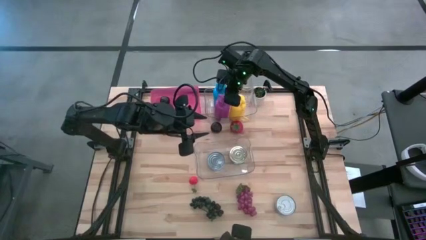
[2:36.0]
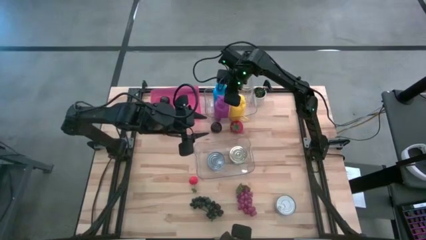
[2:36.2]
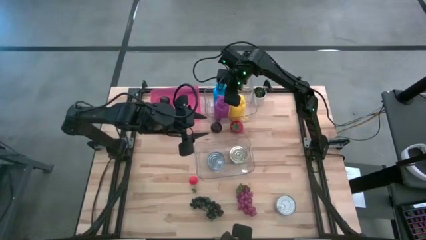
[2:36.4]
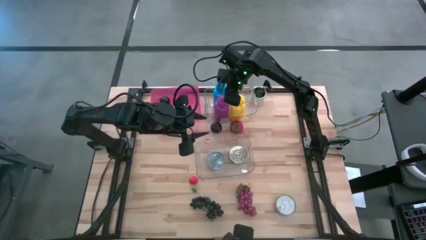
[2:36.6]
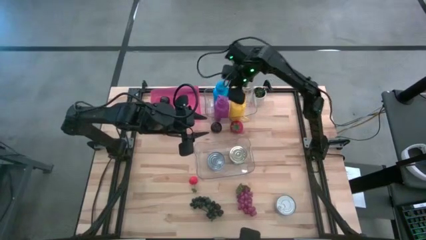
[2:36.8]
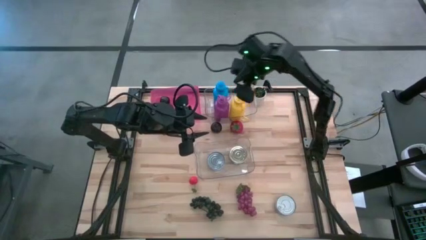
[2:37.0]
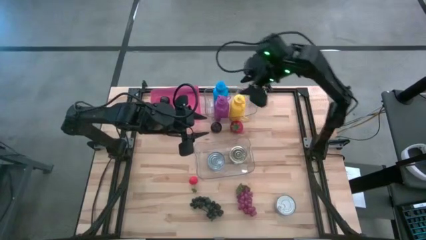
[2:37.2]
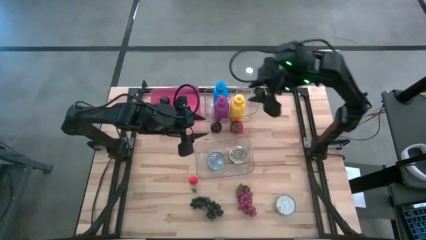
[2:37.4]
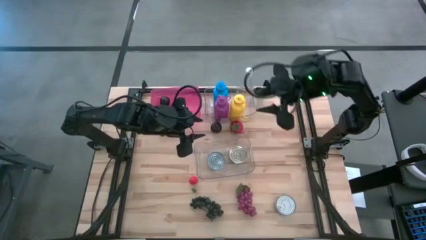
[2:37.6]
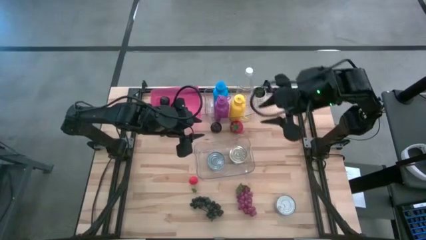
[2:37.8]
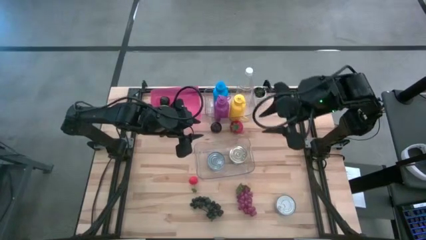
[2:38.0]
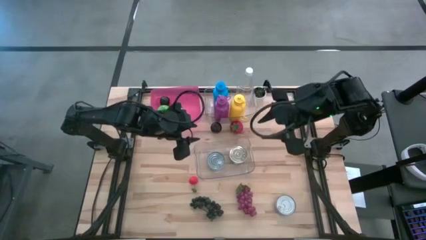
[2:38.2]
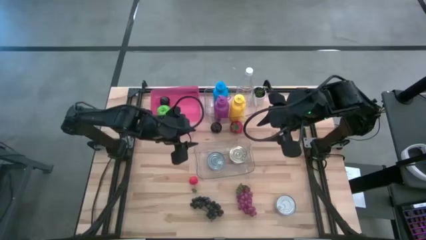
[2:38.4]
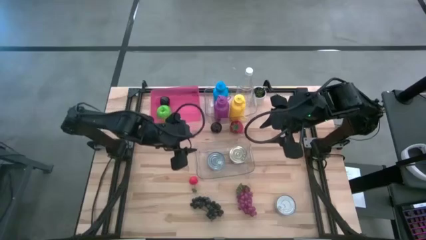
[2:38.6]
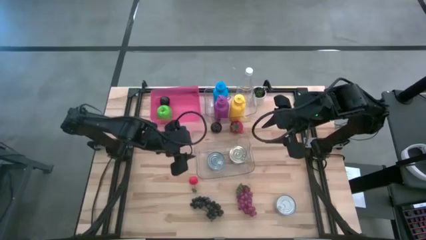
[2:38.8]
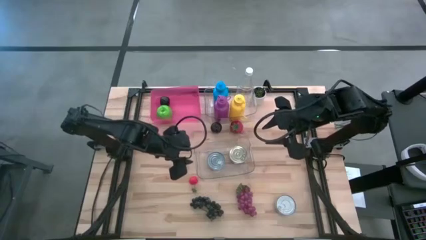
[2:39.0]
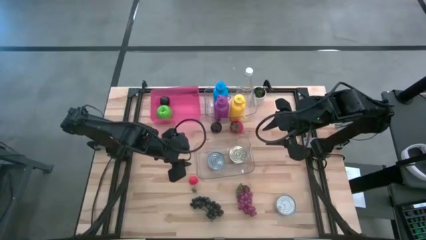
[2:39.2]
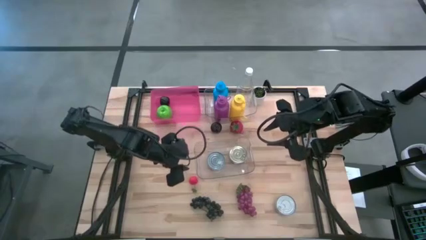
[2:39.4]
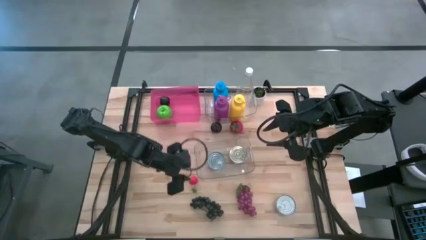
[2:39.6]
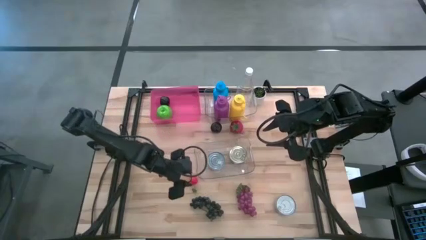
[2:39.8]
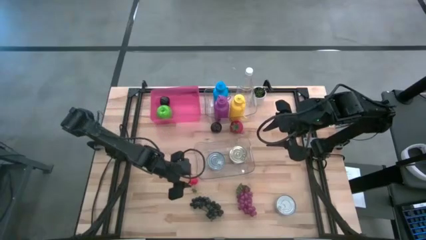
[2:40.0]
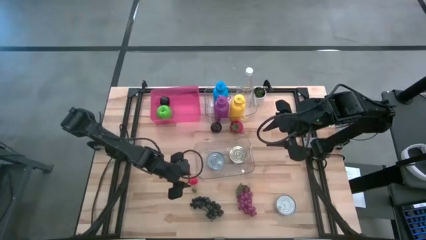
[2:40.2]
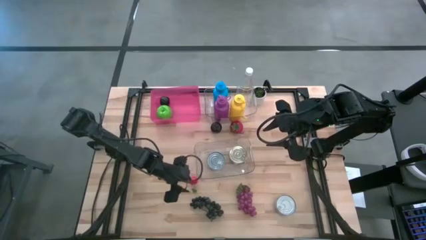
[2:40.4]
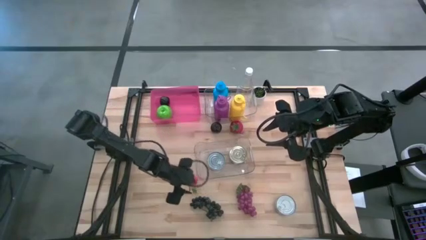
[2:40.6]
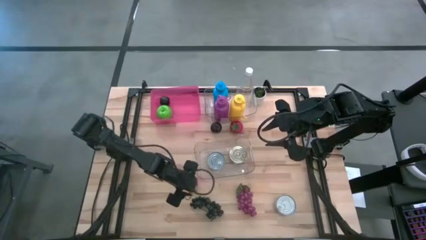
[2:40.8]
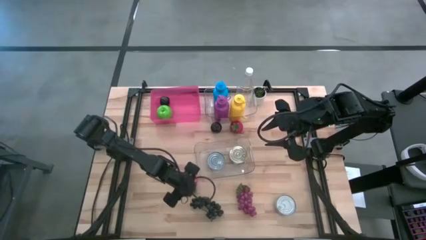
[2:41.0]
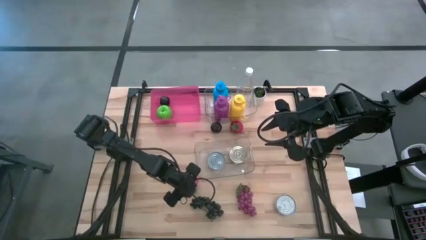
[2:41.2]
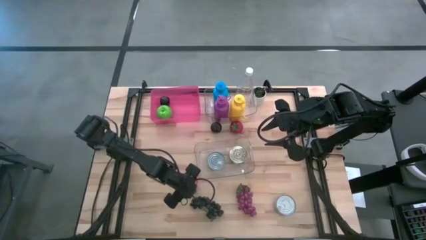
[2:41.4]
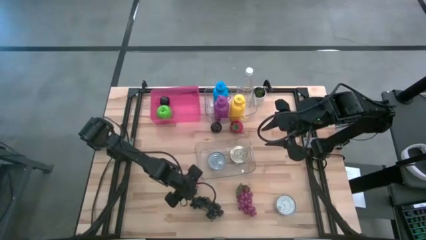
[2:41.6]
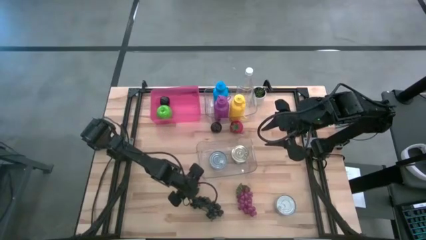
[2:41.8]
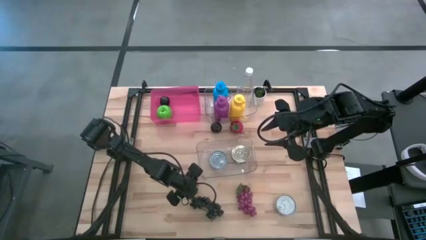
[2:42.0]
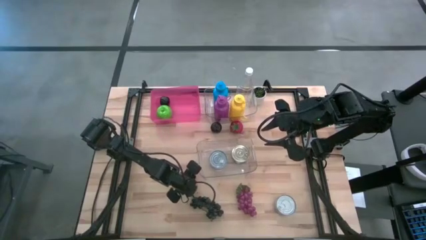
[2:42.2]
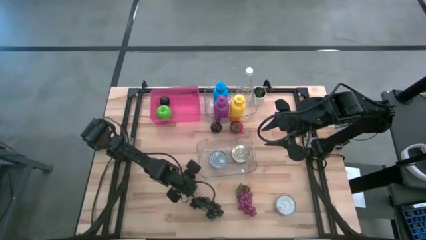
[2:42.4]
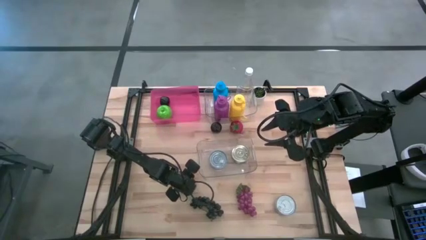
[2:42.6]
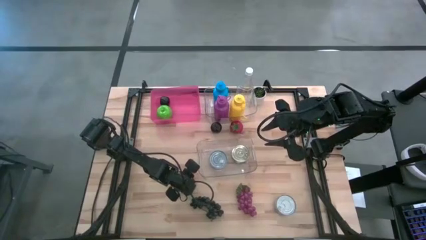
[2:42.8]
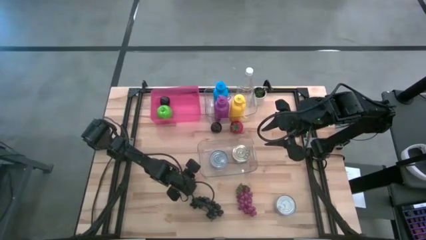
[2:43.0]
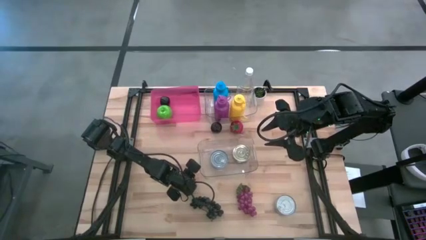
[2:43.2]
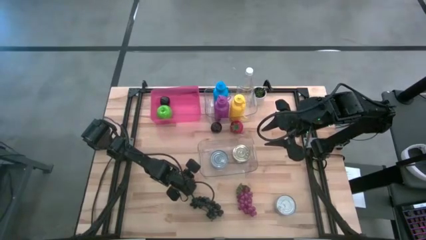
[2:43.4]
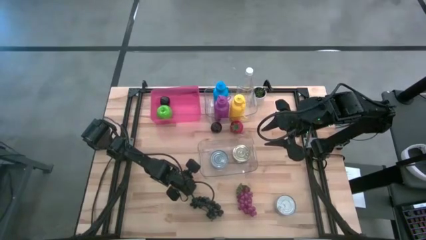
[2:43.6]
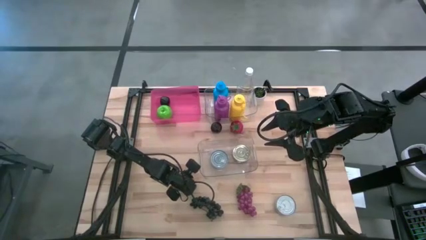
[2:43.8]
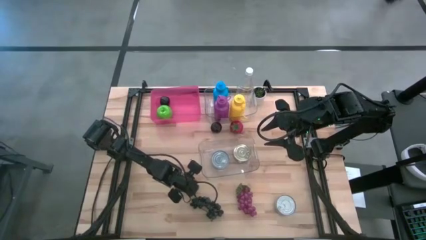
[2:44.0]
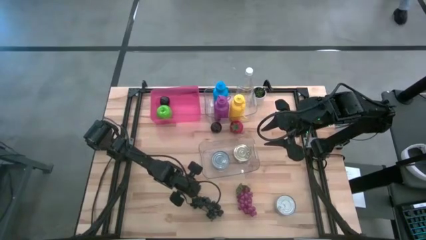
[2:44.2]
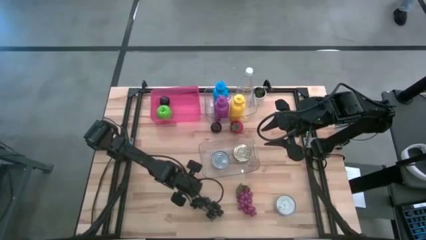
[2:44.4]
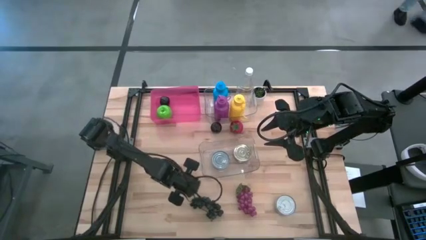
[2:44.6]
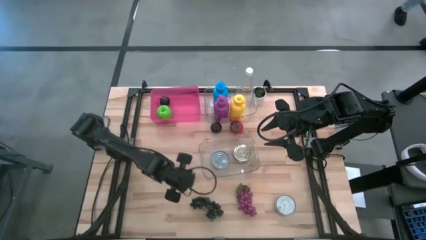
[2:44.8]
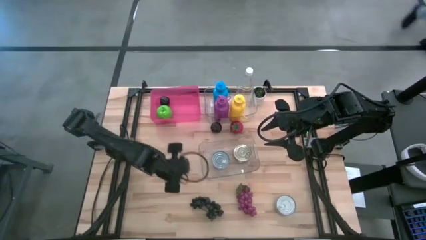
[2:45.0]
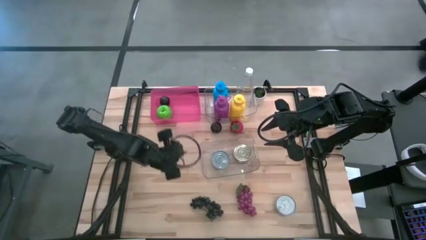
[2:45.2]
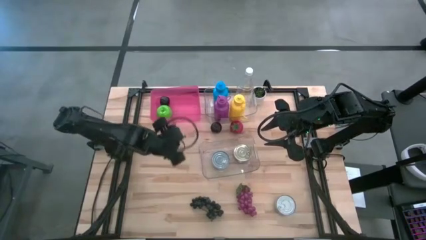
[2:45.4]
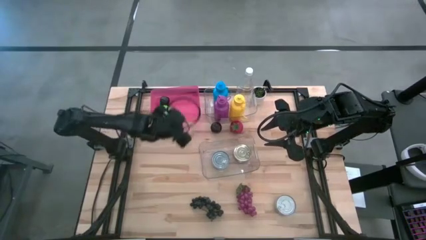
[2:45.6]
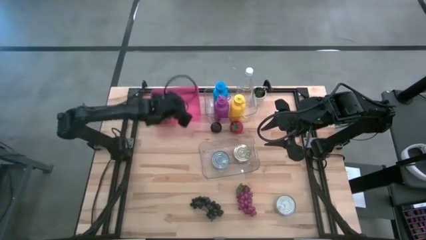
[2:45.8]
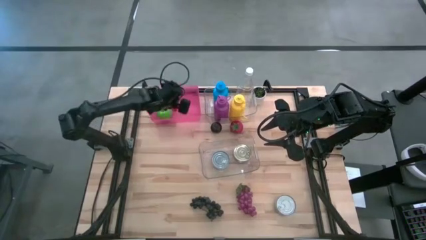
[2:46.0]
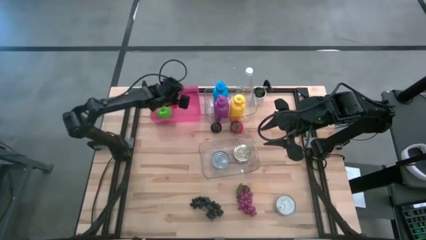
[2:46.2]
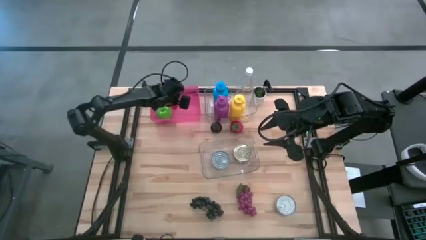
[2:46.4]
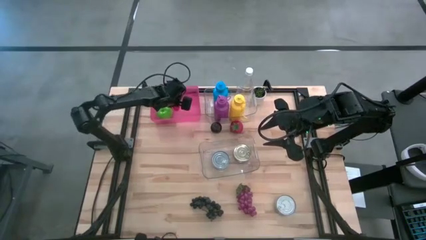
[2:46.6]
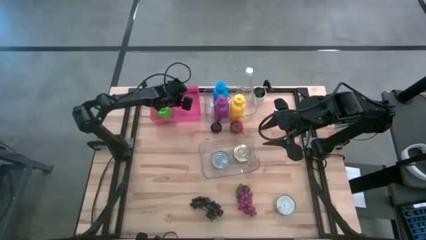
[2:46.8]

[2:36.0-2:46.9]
Task: Pick & Place Food Item
Put the strawberry into the pink bin

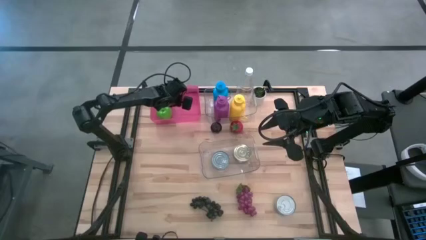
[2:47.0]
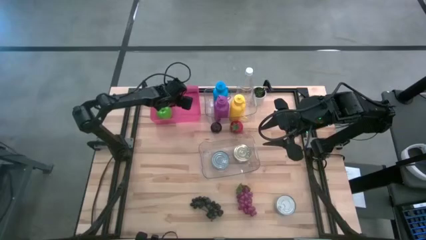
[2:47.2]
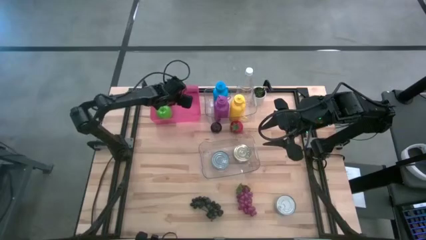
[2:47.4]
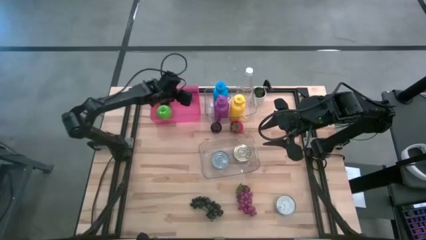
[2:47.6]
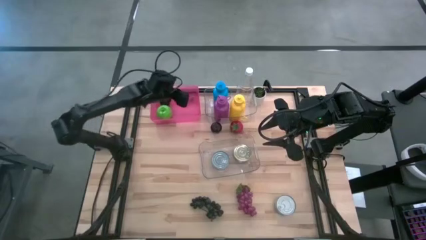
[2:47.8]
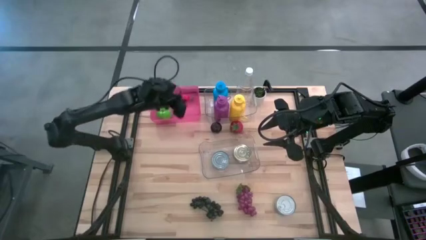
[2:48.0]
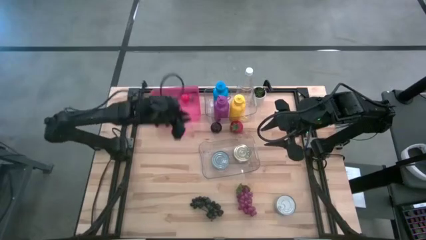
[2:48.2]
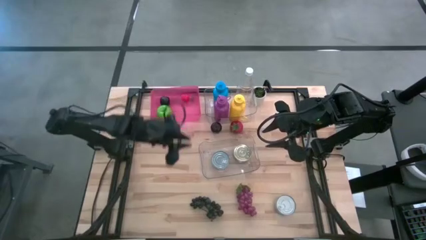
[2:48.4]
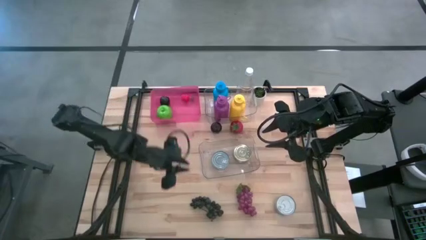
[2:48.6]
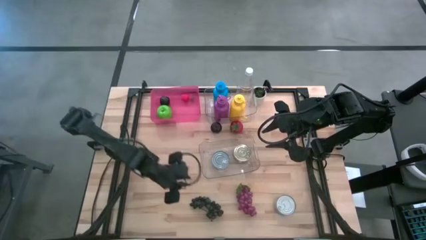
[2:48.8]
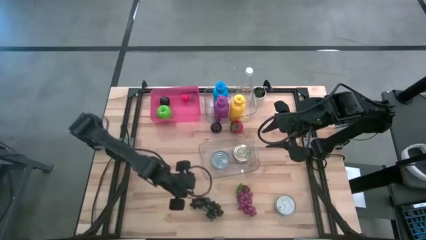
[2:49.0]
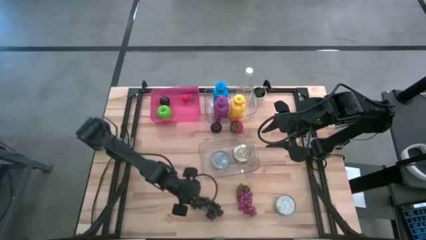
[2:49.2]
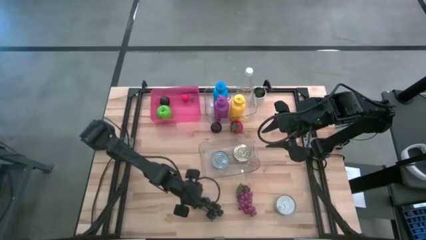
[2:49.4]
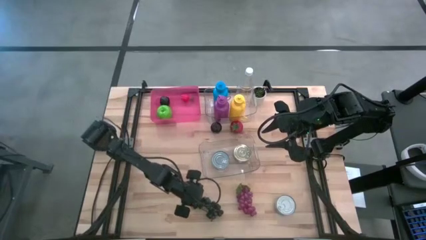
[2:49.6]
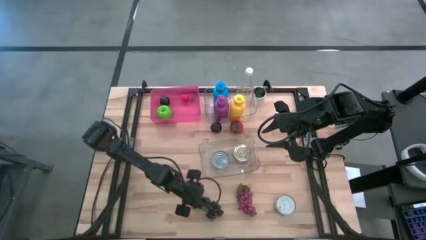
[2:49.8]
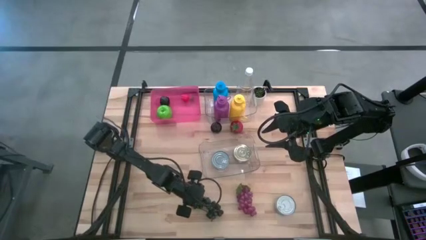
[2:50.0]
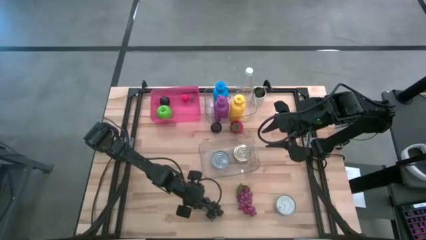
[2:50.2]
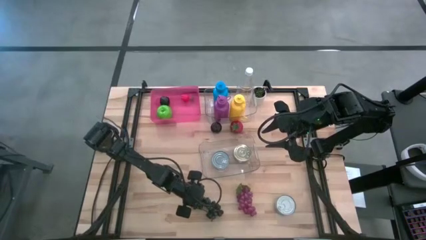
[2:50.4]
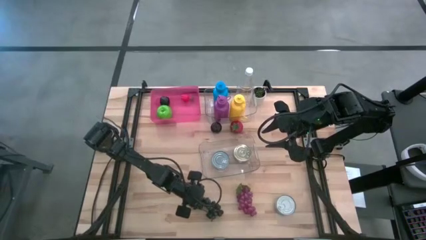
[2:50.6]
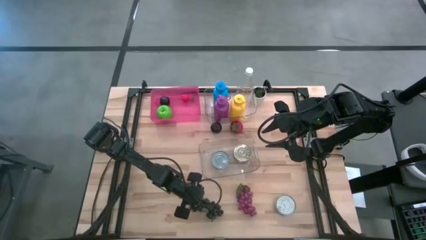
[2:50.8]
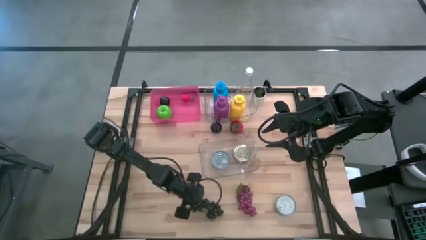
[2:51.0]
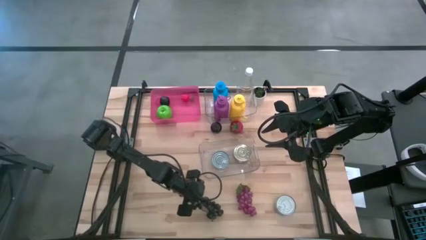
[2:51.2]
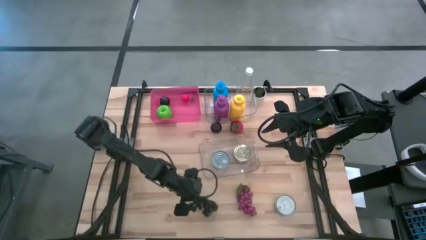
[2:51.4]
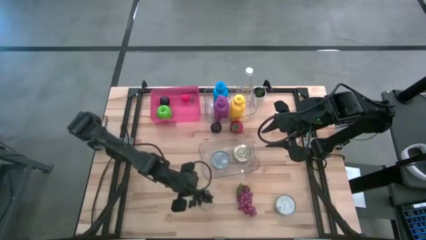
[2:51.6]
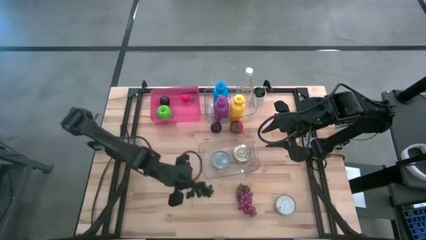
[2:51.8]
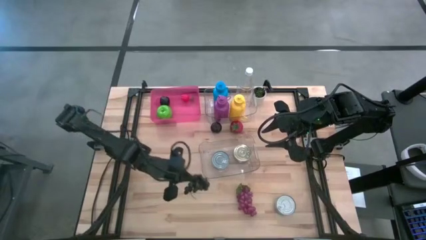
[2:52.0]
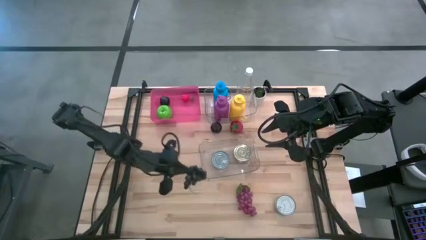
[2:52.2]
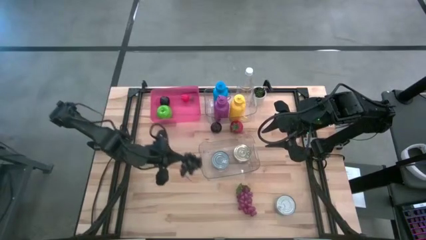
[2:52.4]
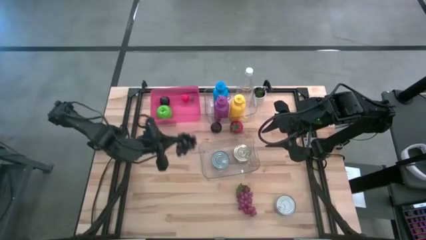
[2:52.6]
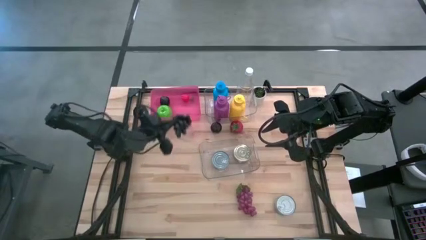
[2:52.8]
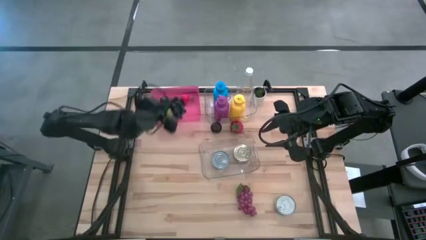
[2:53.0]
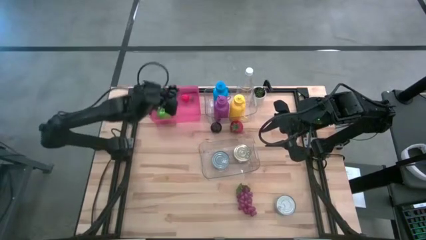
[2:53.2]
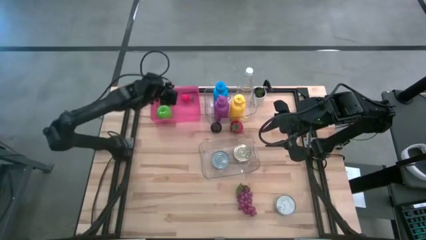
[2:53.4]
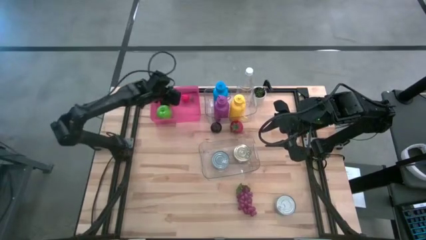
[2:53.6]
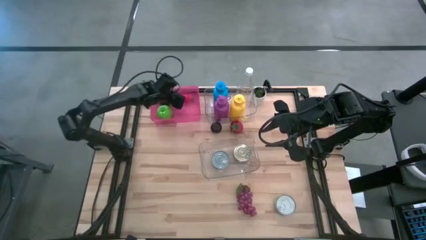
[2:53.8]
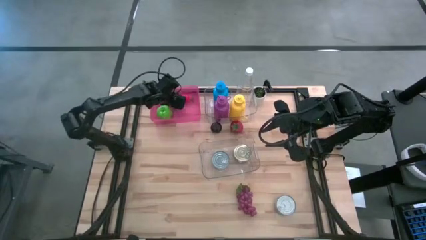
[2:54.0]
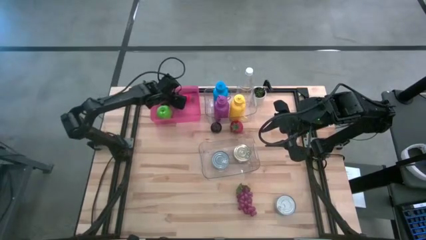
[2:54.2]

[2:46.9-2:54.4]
Put the black grapes into the pink bin
